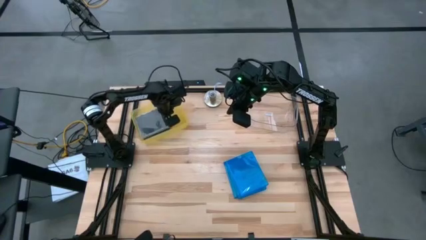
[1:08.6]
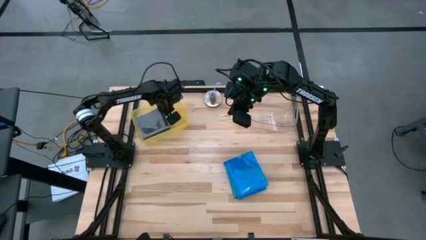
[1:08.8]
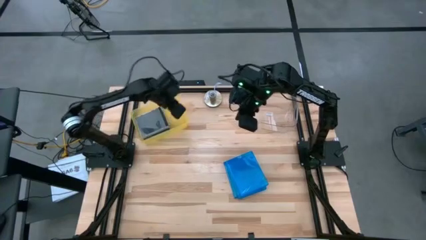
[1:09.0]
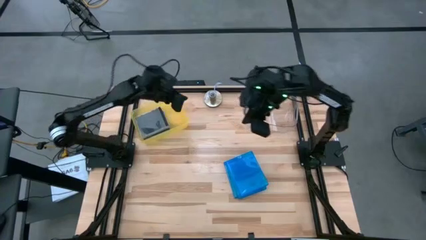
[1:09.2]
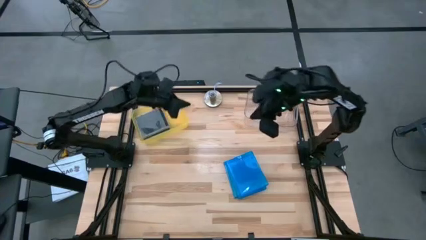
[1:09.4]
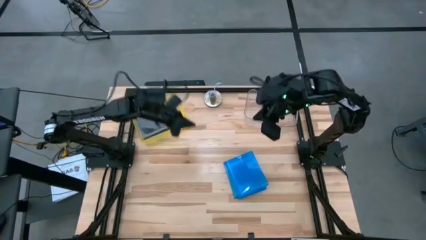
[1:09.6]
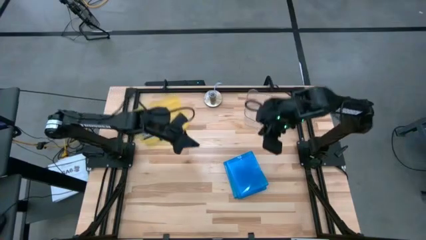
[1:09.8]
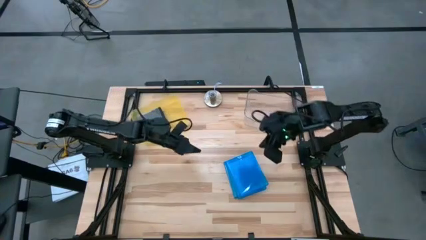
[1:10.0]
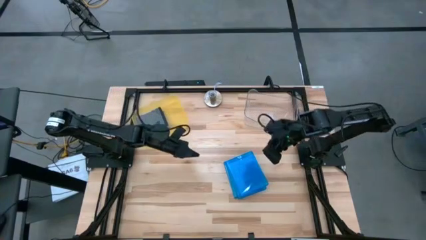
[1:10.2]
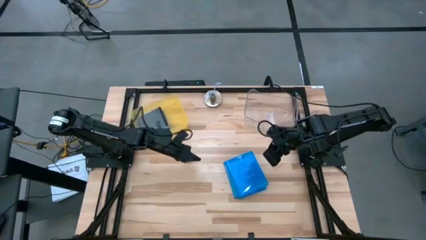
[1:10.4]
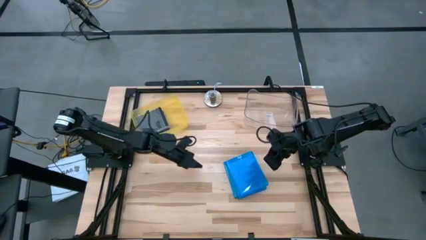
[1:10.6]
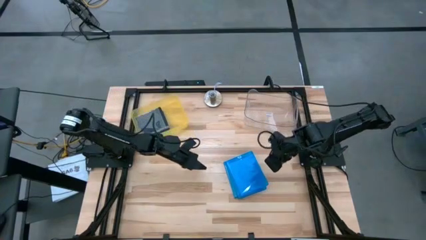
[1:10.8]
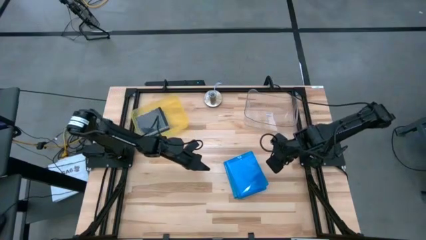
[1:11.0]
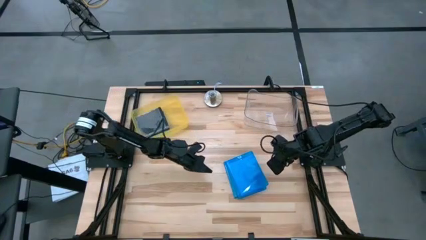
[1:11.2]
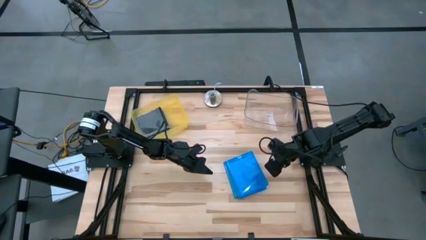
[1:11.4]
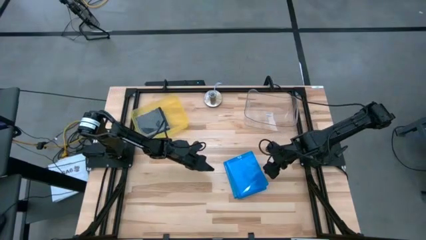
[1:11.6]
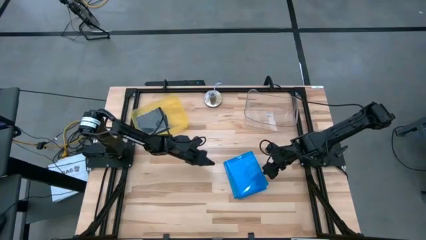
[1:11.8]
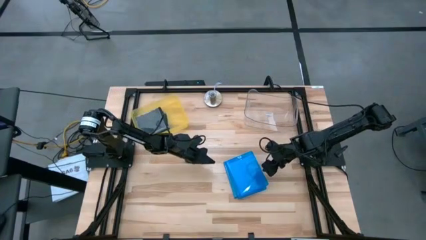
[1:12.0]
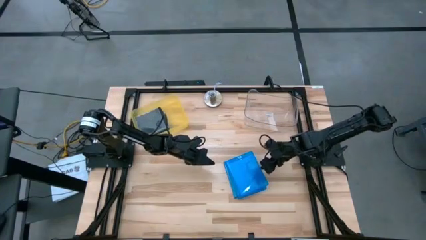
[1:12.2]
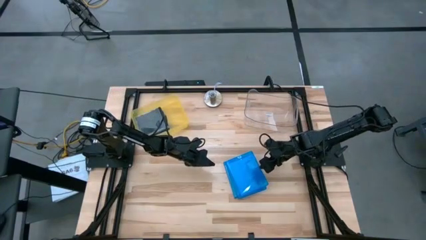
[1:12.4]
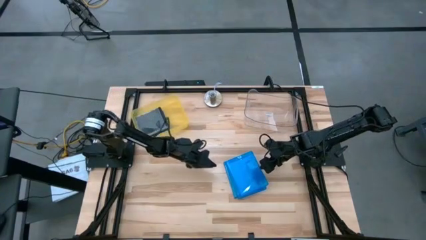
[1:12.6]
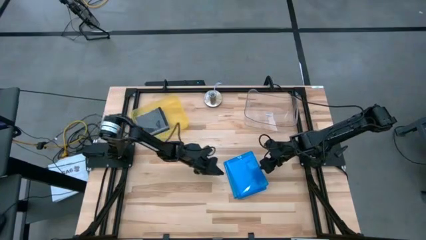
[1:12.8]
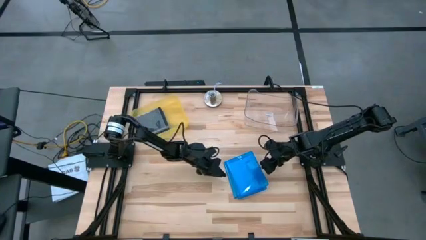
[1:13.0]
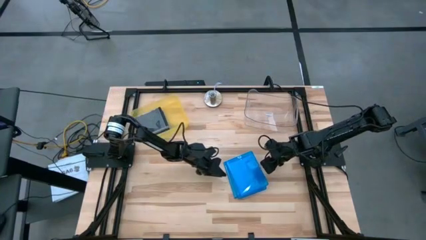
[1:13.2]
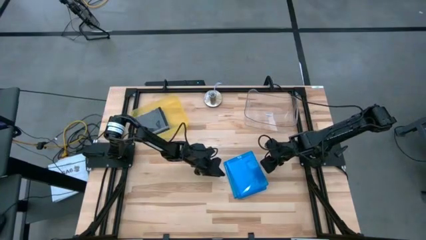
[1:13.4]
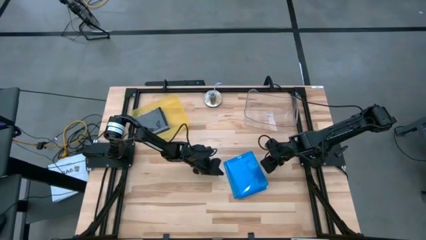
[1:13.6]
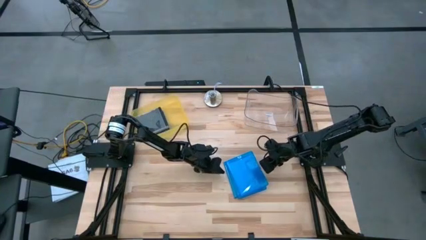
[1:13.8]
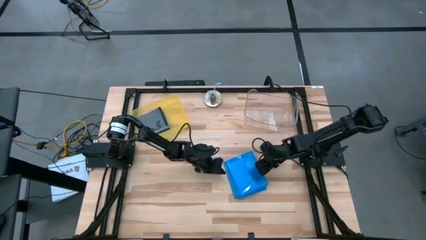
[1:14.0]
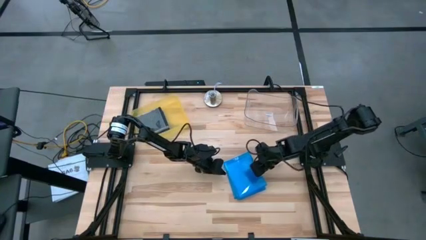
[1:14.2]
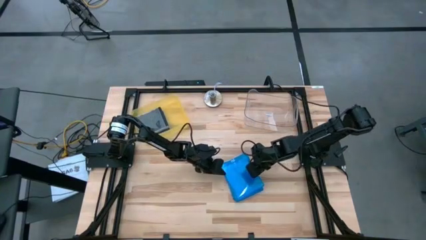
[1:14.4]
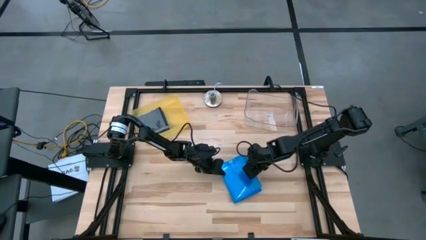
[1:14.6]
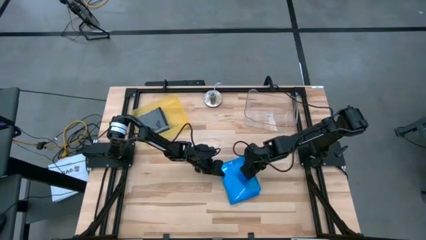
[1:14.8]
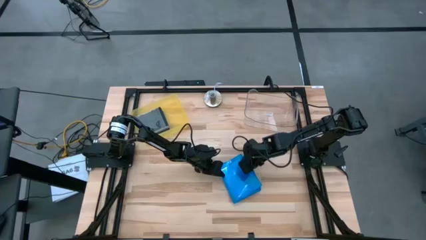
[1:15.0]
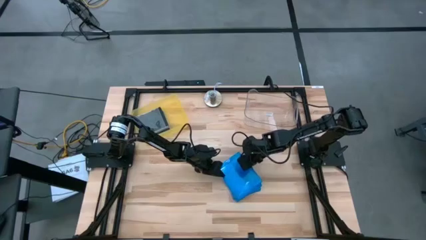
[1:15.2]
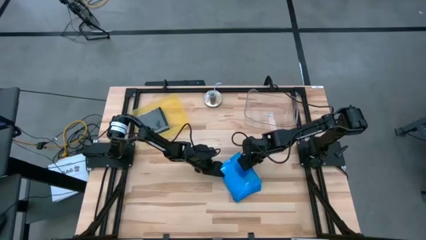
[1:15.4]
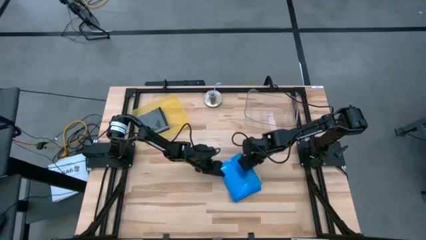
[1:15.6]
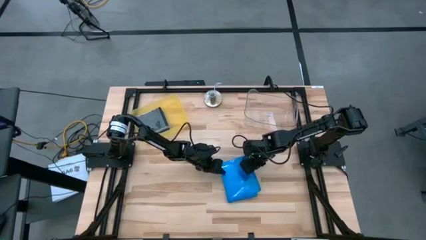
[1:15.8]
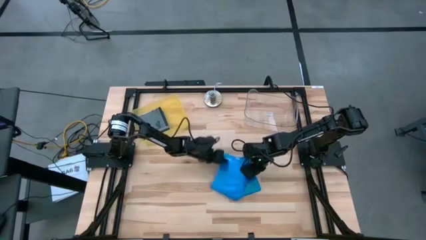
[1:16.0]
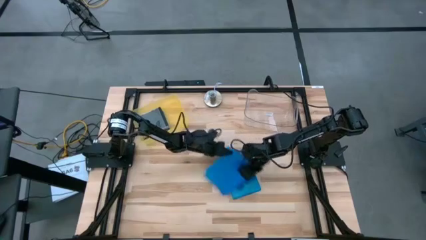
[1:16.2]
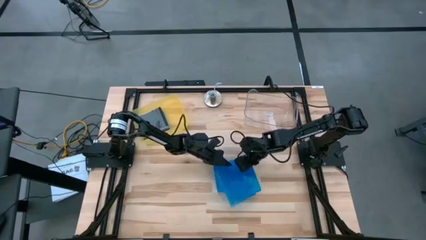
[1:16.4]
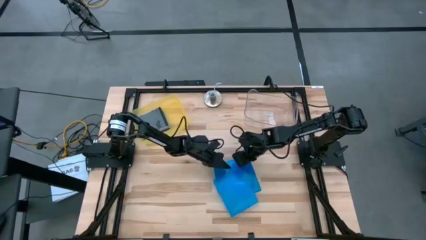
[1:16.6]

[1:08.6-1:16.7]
Task: Pick & place jewel cases by type
Put the blue CD case into the transparent bin

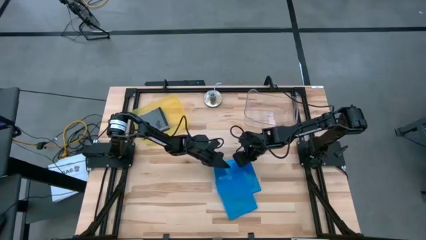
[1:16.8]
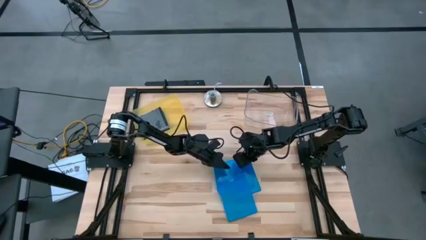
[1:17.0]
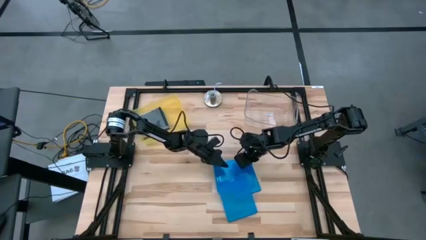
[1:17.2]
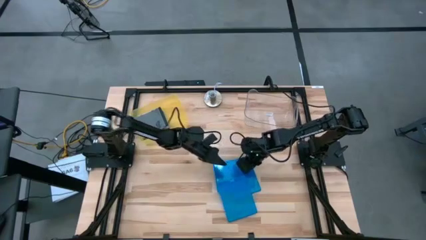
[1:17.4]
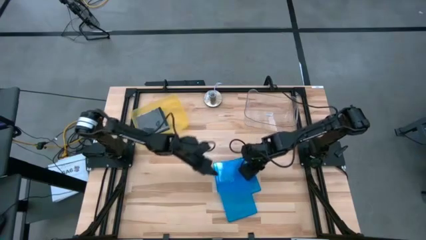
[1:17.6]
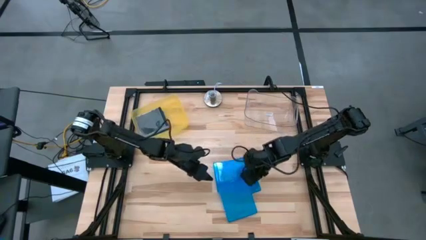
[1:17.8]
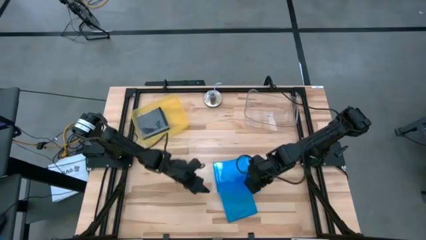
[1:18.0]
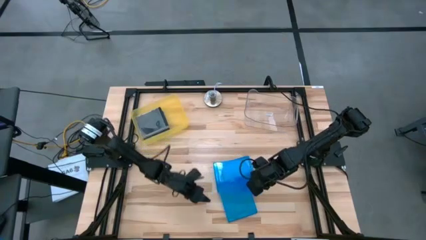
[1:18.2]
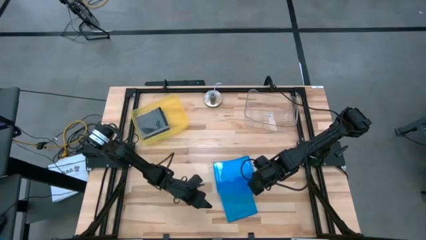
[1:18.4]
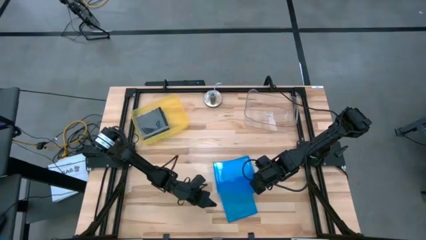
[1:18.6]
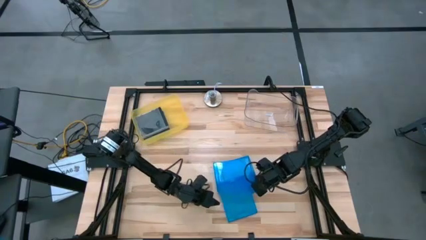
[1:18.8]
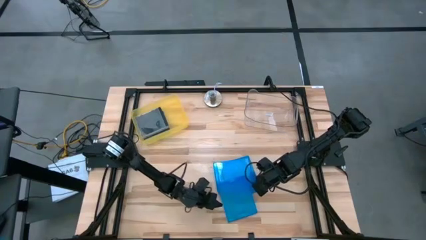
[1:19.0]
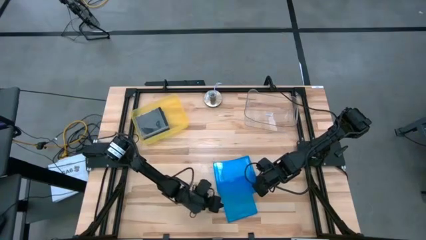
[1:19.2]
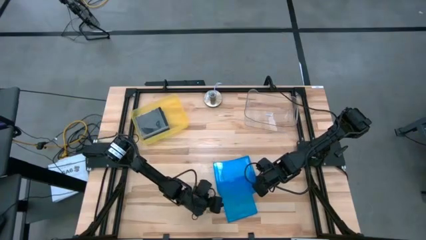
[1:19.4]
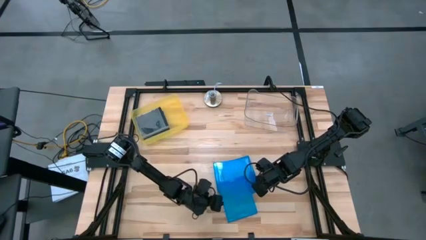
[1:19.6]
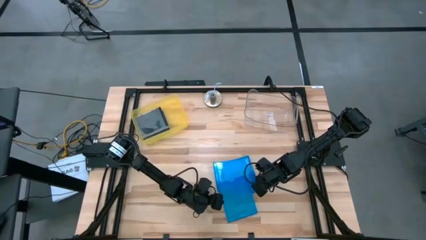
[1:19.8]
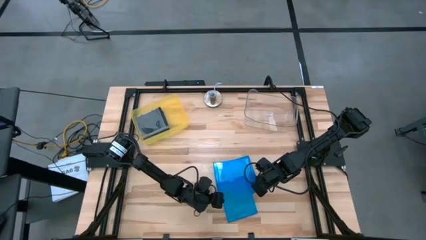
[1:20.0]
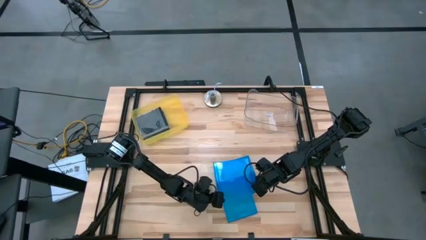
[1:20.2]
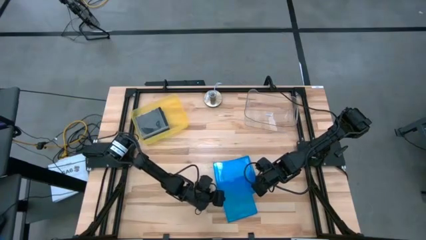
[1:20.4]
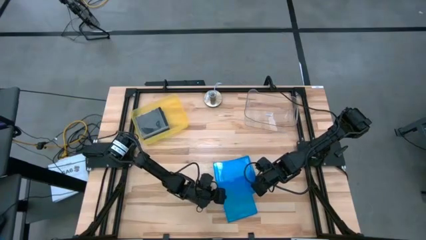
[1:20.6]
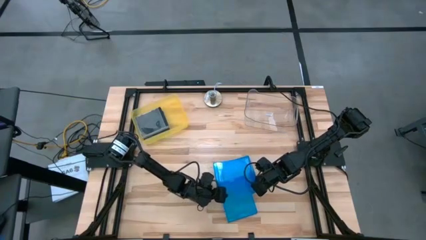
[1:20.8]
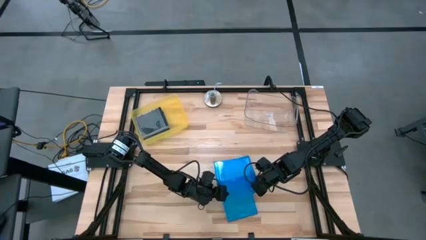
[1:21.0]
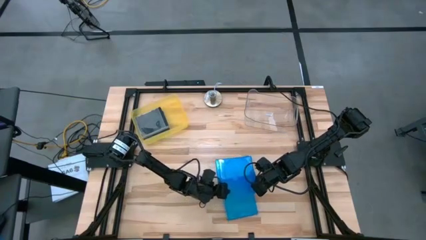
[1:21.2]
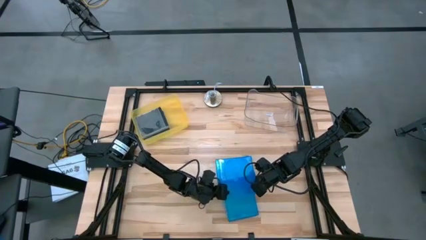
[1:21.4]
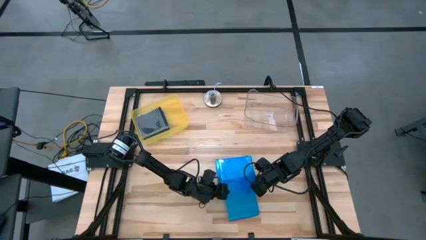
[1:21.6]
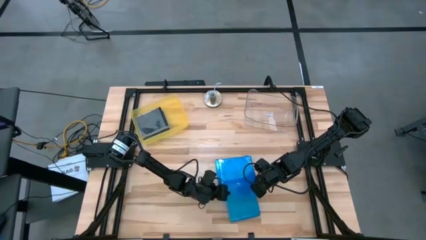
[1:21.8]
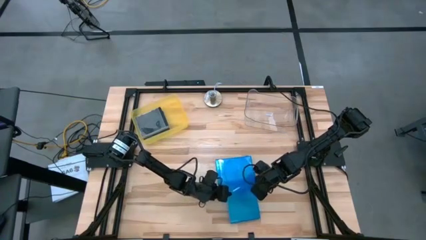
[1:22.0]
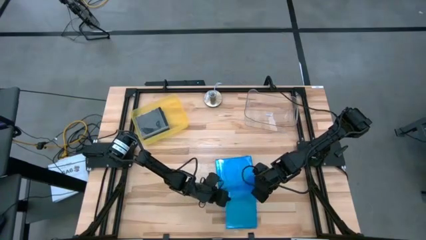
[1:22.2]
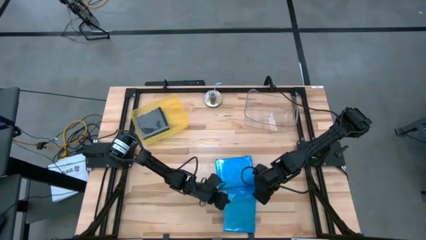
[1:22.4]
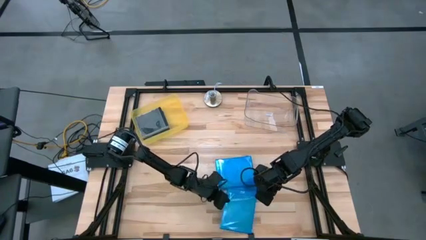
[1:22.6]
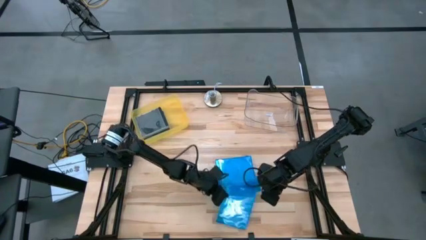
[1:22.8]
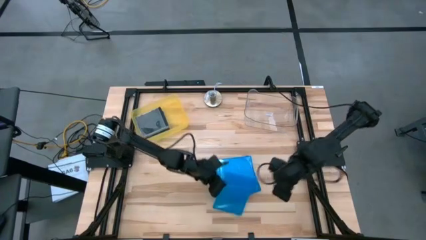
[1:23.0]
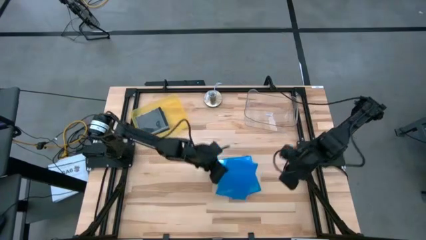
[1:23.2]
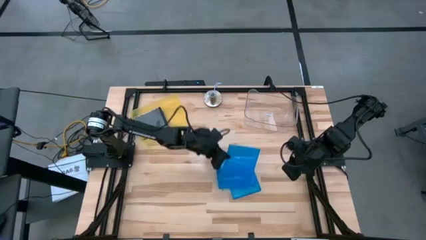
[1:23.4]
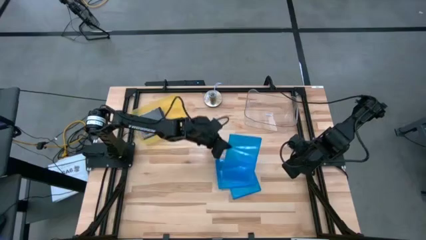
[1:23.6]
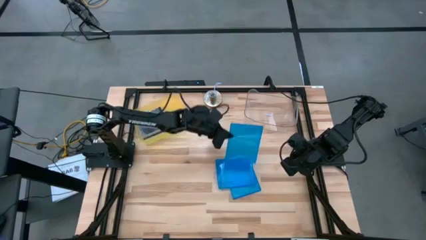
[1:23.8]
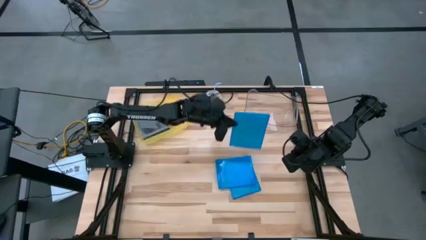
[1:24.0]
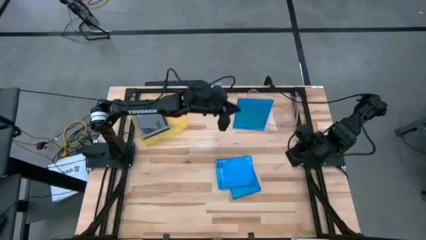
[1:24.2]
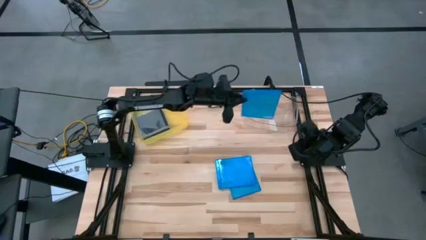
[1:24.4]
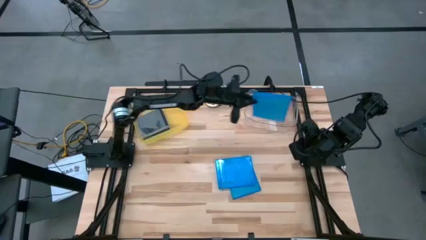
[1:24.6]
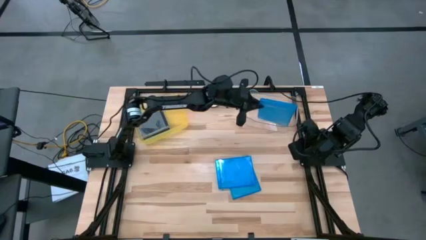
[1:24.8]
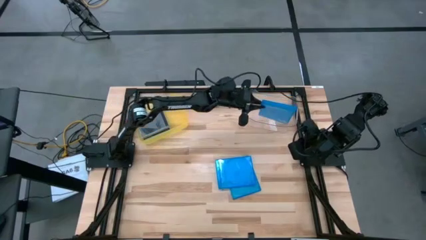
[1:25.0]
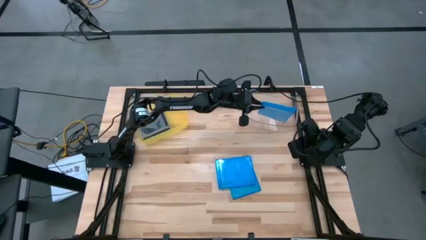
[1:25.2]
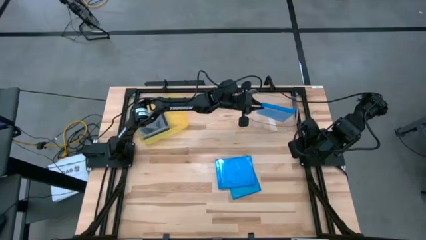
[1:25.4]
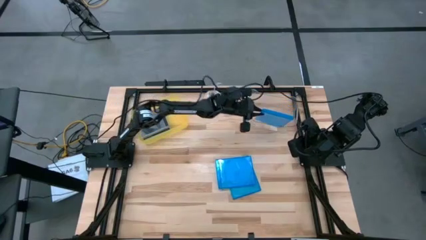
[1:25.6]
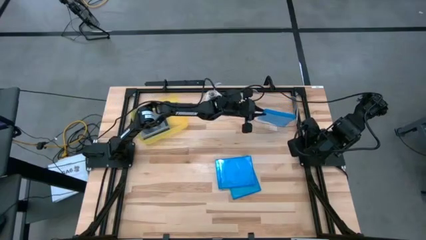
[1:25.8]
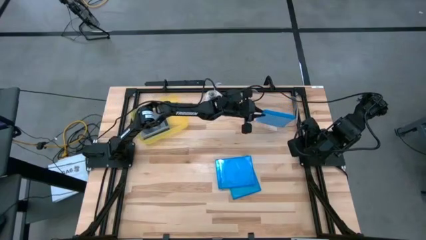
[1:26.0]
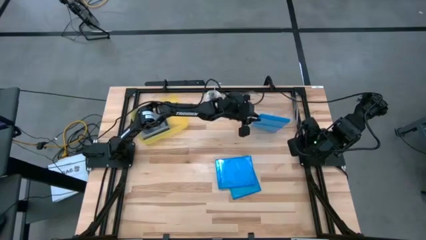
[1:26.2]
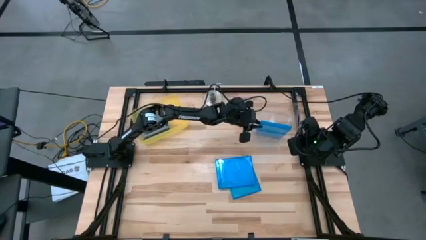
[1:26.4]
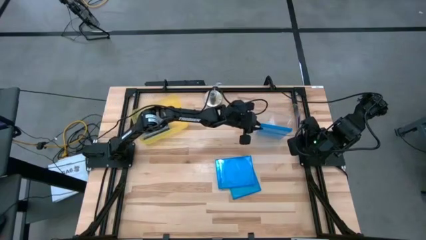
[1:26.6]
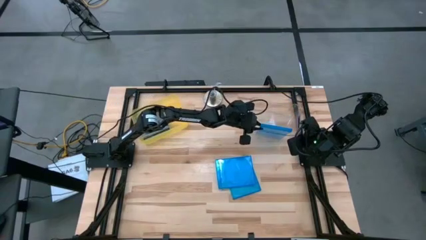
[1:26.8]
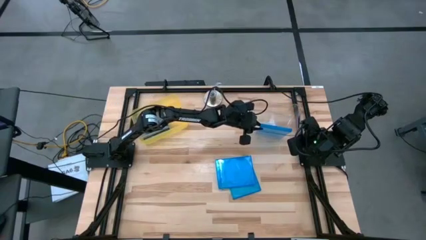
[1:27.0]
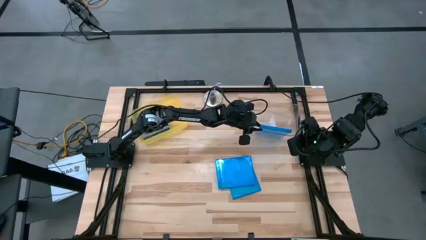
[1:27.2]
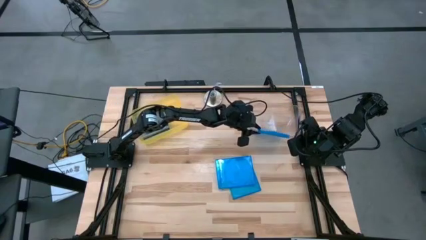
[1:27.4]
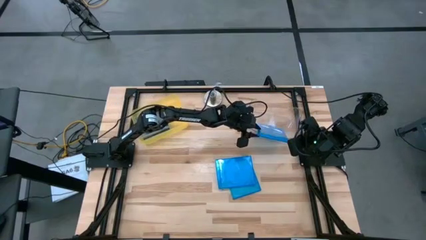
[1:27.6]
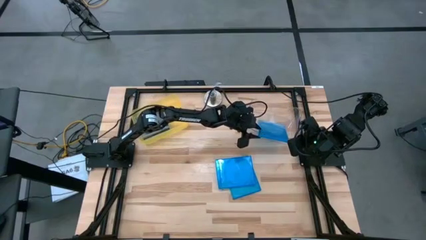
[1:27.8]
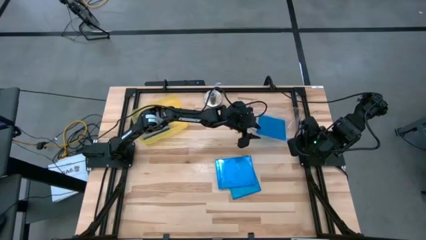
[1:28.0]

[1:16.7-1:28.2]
Put the blue CD case into the transparent bin
